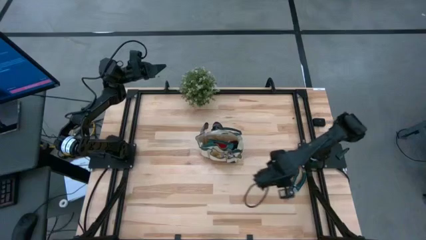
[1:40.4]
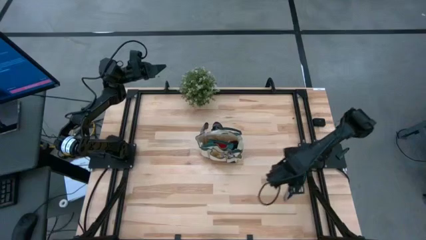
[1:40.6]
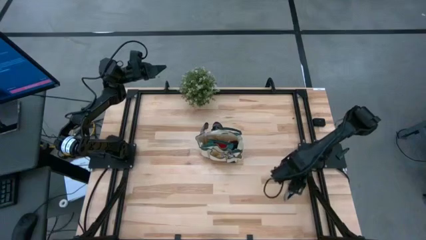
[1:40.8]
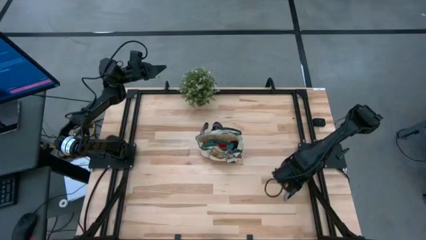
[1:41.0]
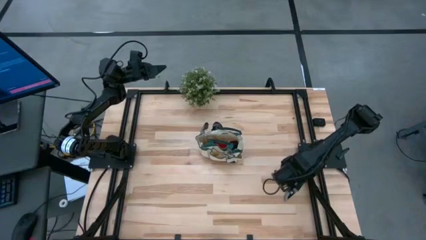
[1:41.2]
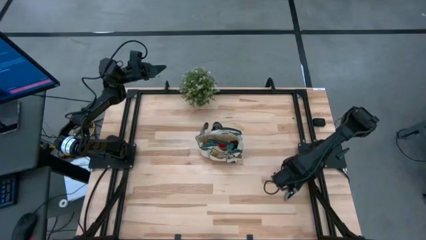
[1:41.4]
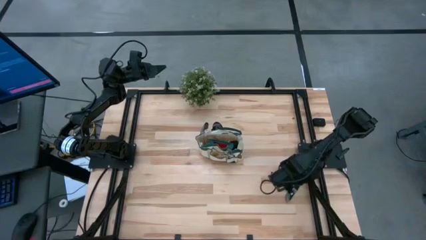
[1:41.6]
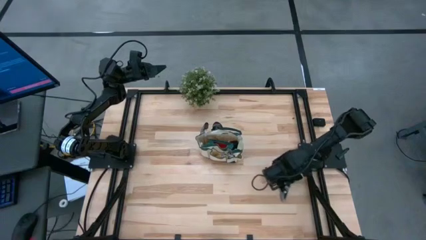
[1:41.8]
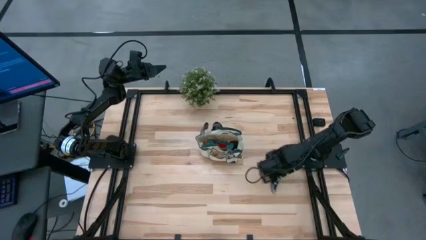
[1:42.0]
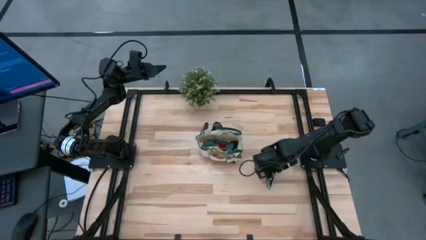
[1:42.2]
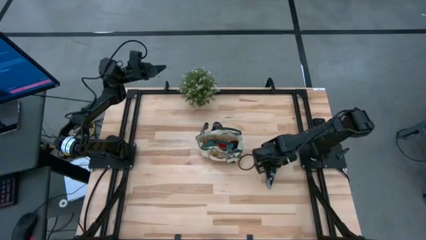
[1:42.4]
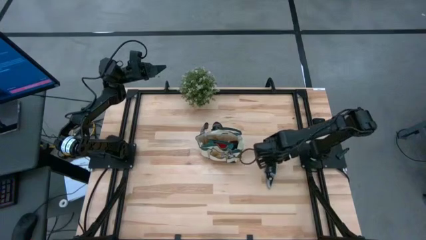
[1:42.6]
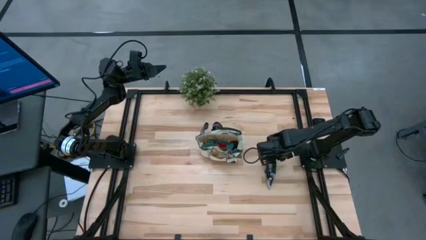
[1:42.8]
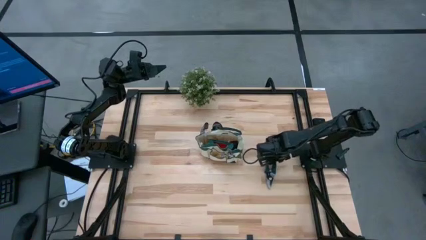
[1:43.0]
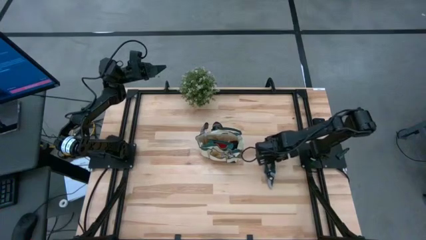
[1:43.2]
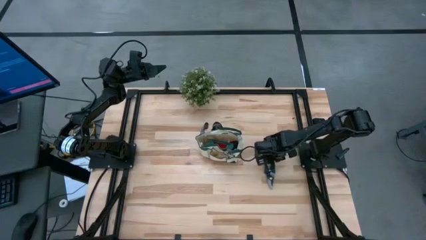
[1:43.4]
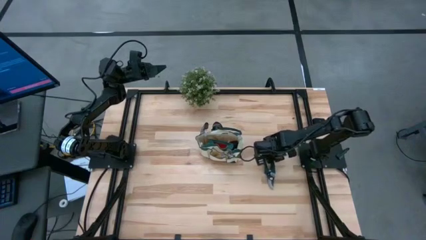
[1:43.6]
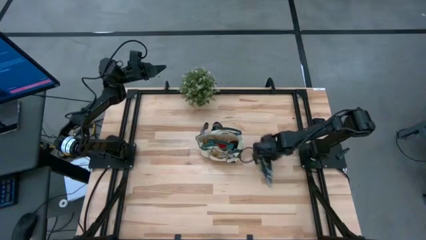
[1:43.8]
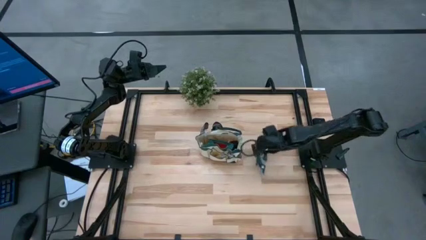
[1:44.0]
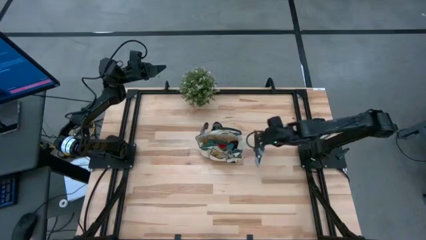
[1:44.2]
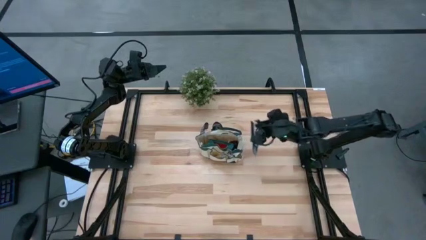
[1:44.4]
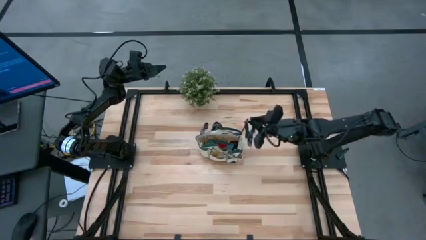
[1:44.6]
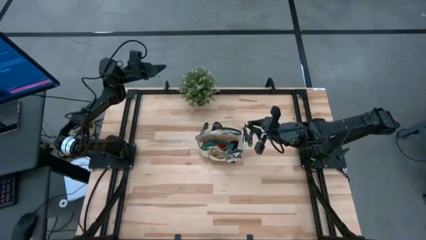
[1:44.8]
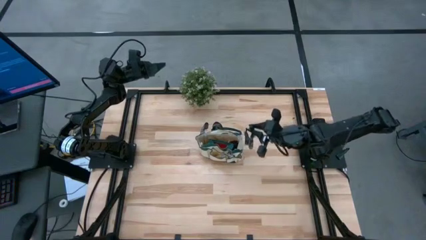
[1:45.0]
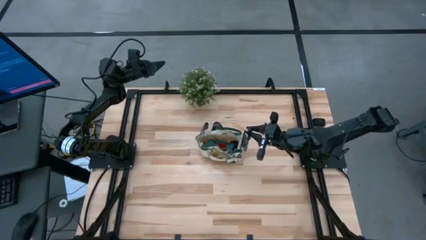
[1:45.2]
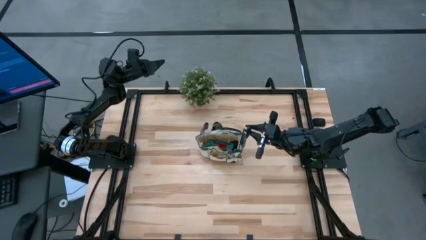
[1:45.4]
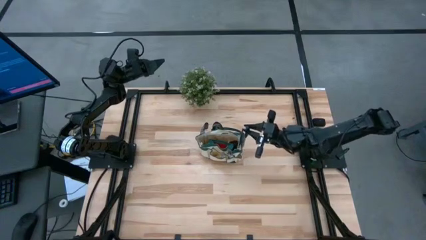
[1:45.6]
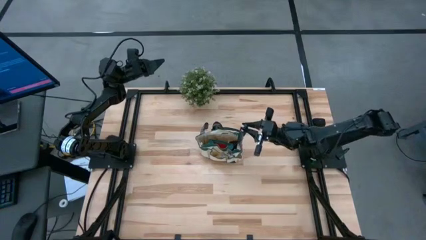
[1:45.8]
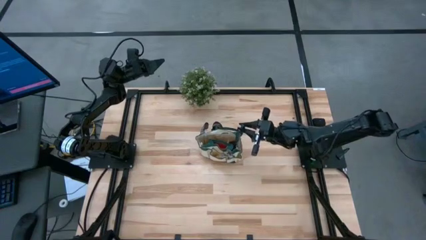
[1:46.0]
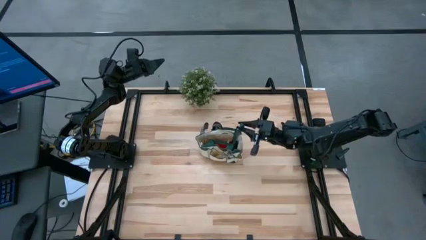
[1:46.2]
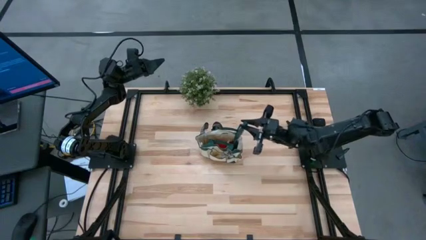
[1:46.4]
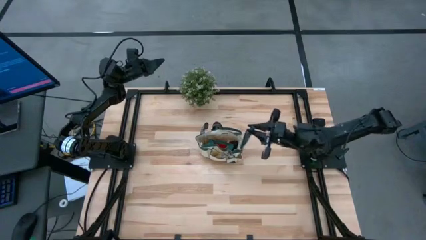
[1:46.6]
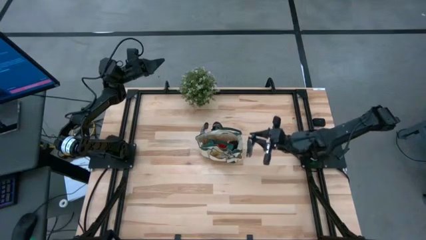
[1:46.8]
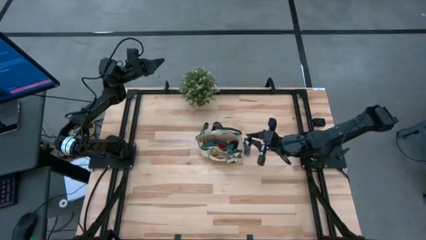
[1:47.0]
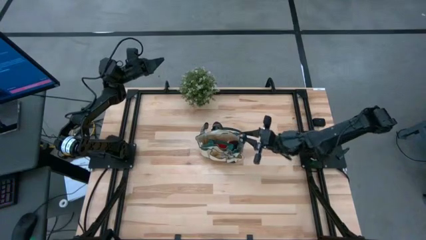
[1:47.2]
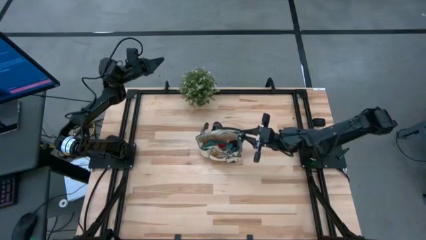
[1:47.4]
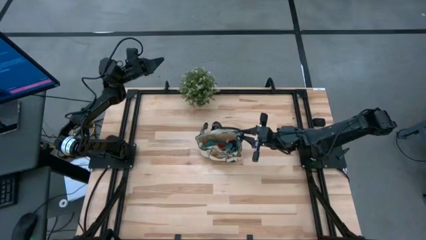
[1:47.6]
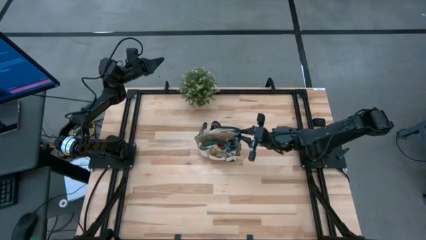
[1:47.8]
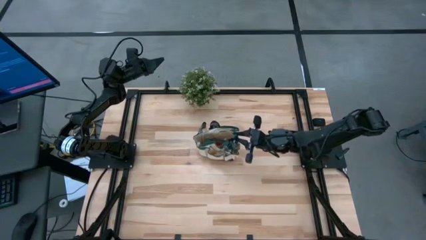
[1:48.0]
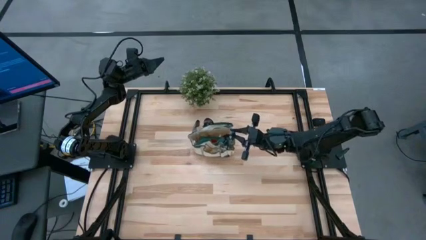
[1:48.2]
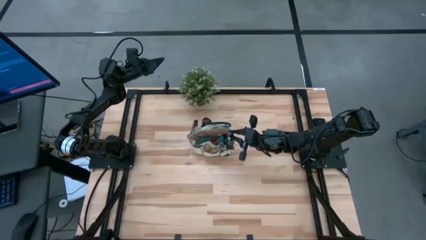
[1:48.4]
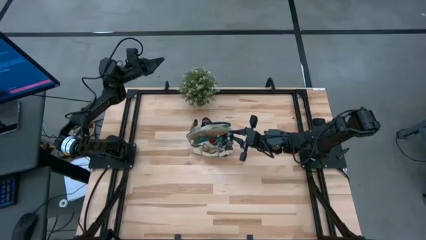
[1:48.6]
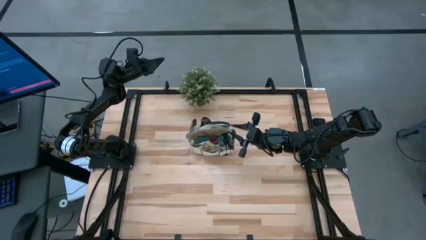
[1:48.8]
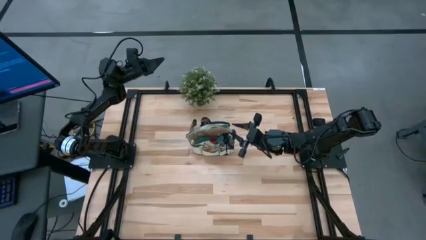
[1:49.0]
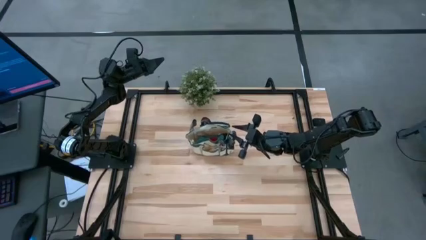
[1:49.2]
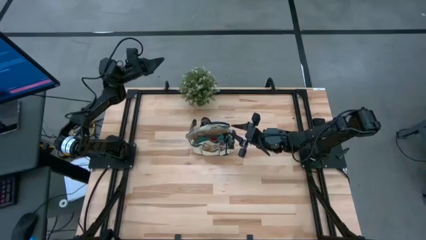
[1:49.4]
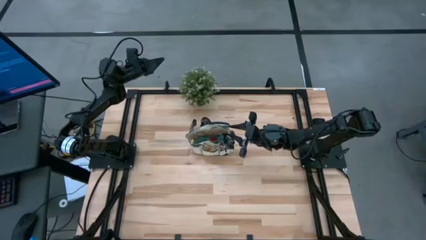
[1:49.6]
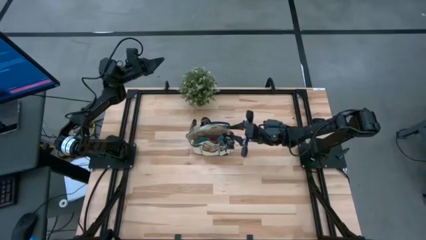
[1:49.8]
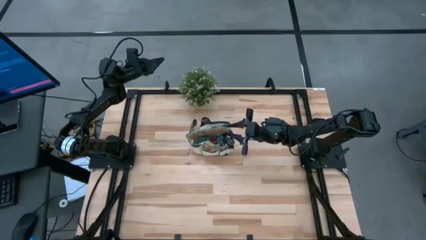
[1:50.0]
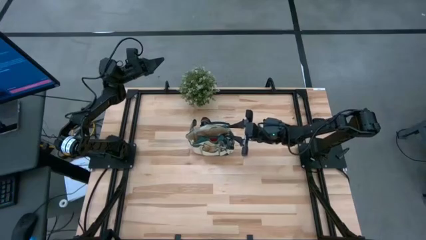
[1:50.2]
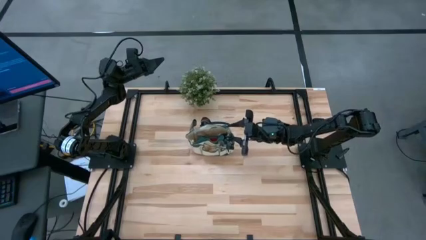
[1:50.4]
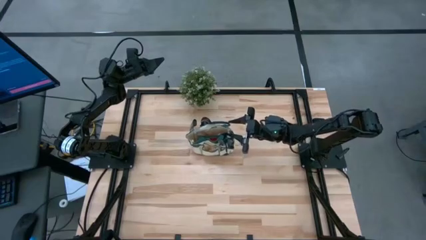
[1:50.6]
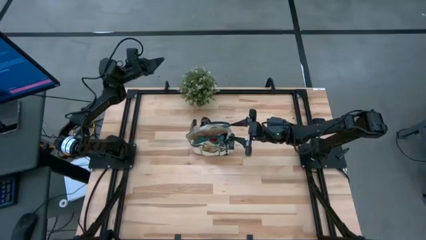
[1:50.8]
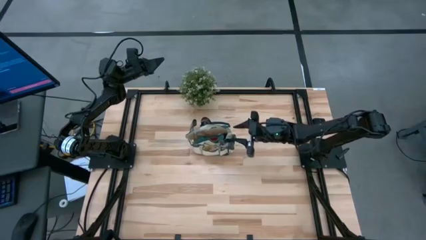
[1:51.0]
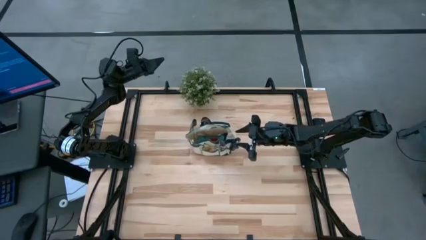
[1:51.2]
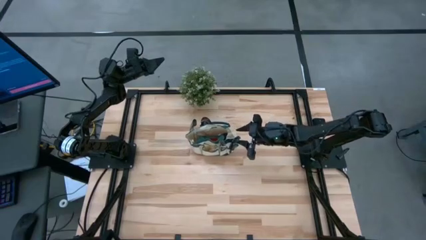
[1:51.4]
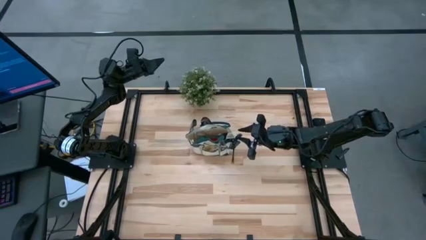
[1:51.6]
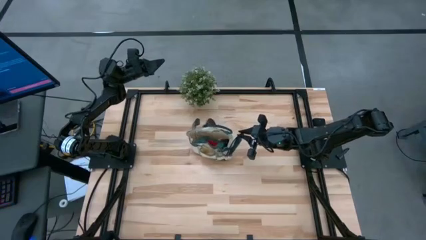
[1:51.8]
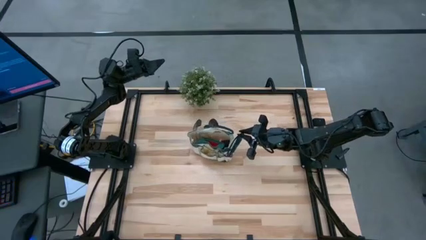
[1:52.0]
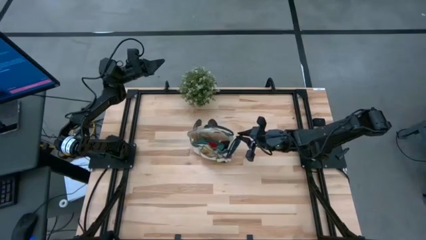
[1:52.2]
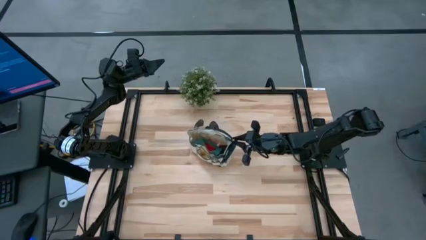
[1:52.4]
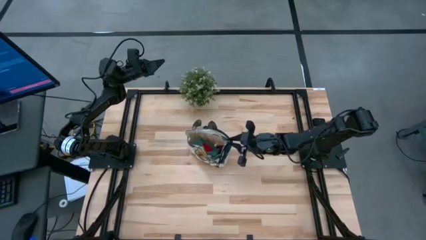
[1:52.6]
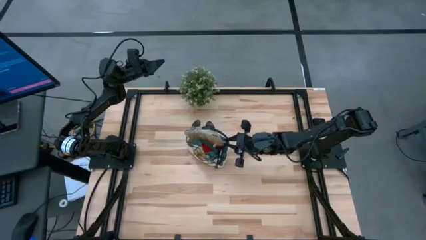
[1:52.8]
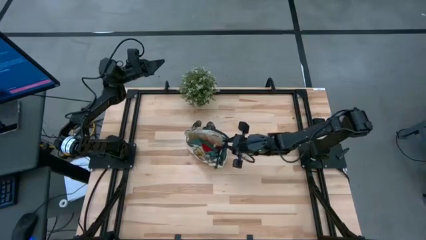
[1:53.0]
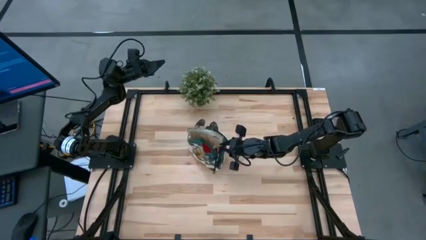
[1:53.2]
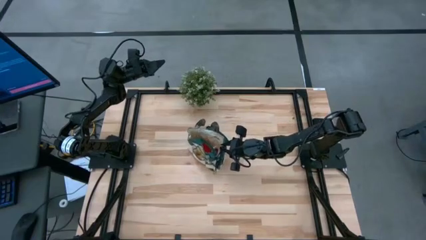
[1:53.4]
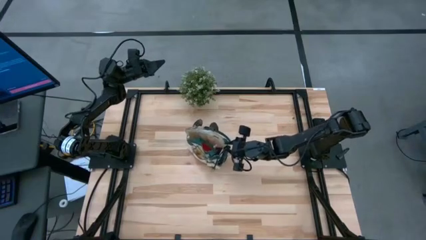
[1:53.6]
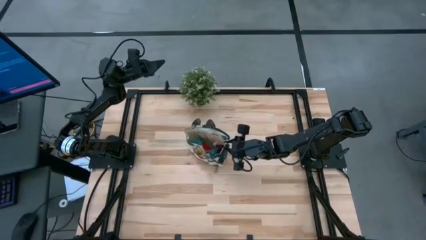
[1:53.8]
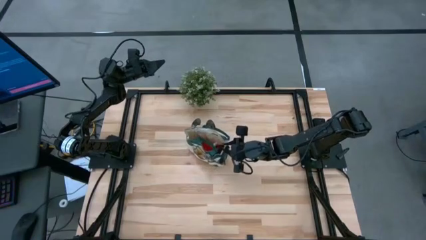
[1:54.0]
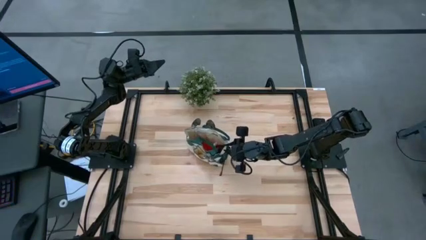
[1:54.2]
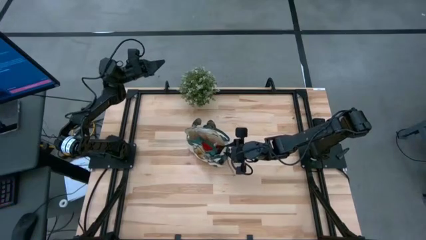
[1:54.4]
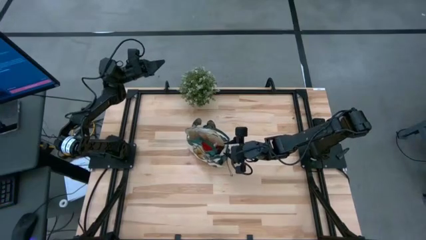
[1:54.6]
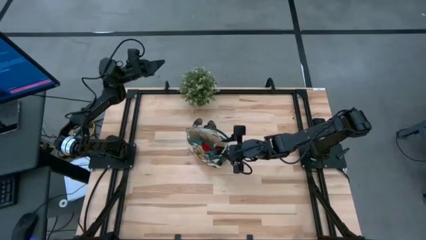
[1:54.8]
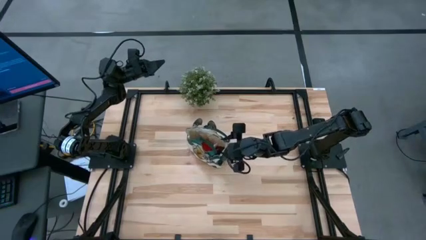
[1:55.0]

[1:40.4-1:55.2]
Task: Pick & Place Garden tools in Gardening bag
Put the green shear scissors into the white gardening bag
